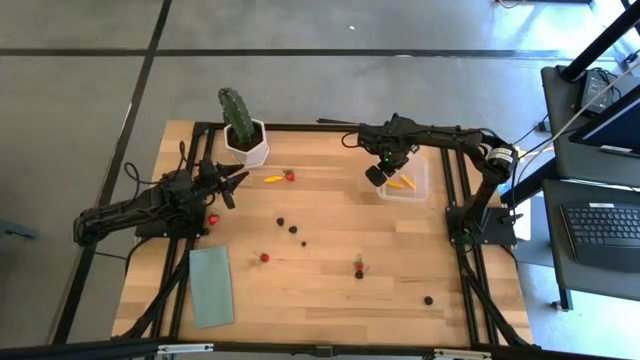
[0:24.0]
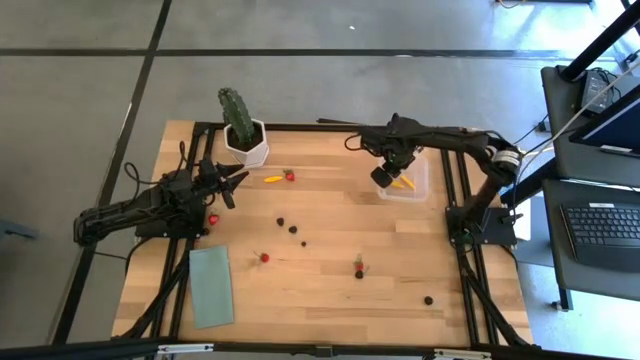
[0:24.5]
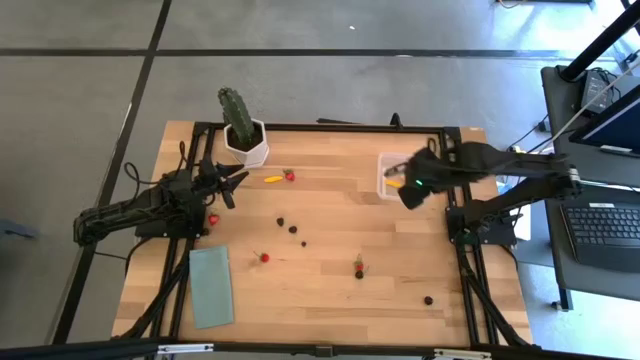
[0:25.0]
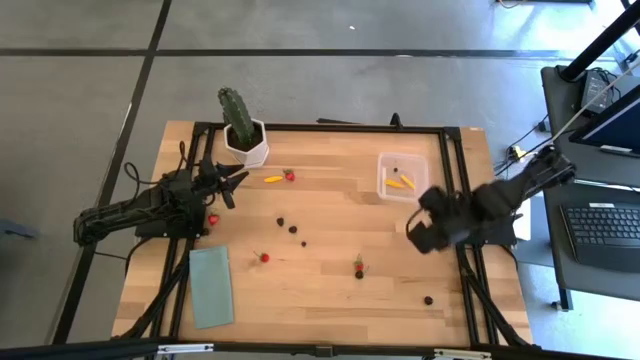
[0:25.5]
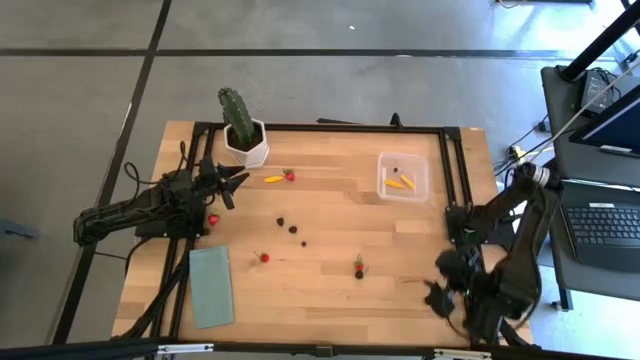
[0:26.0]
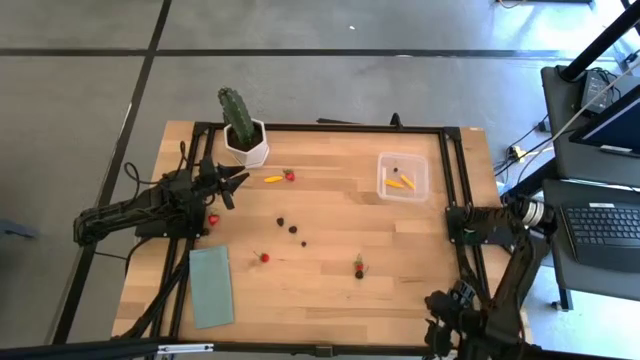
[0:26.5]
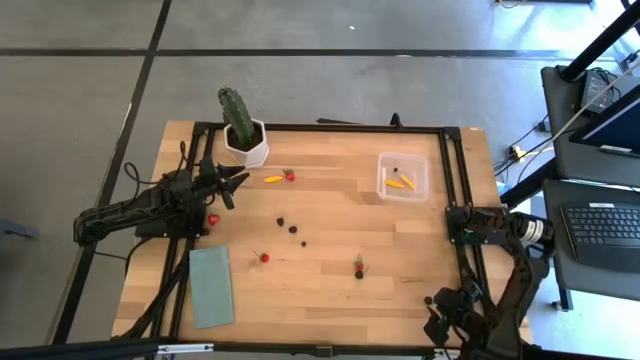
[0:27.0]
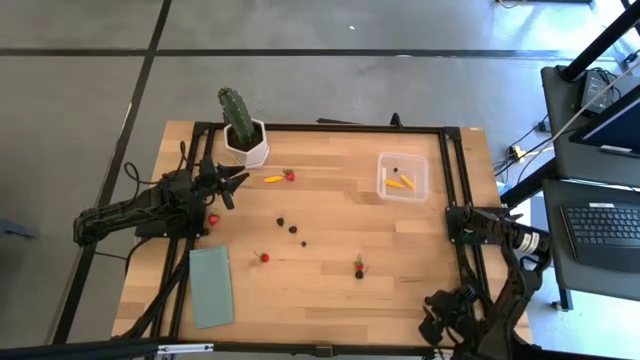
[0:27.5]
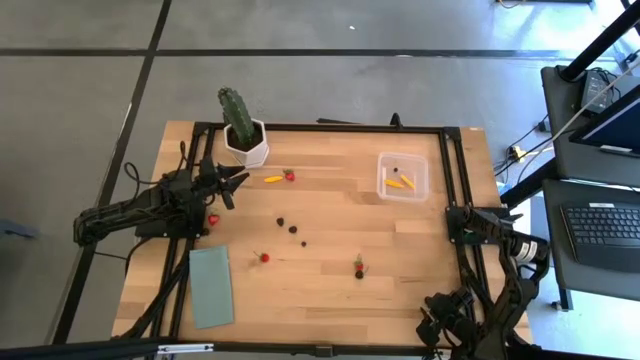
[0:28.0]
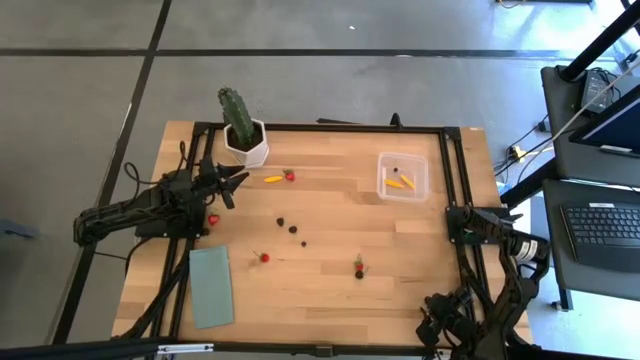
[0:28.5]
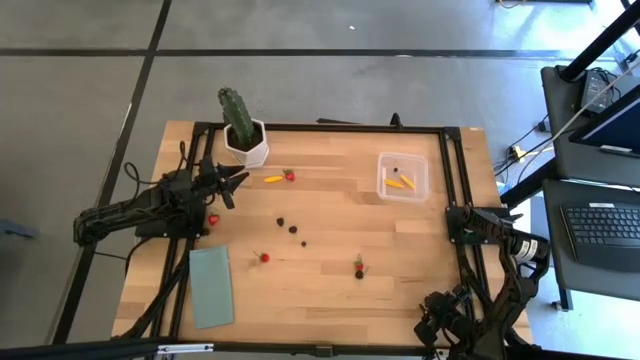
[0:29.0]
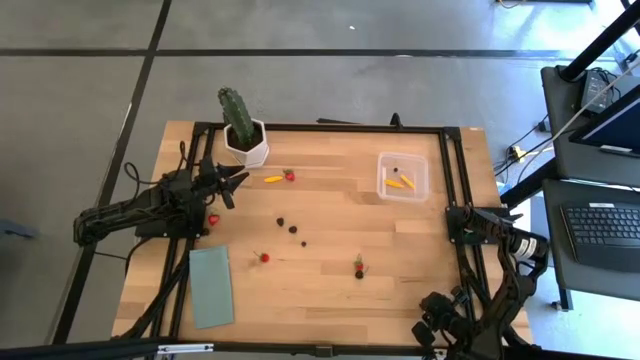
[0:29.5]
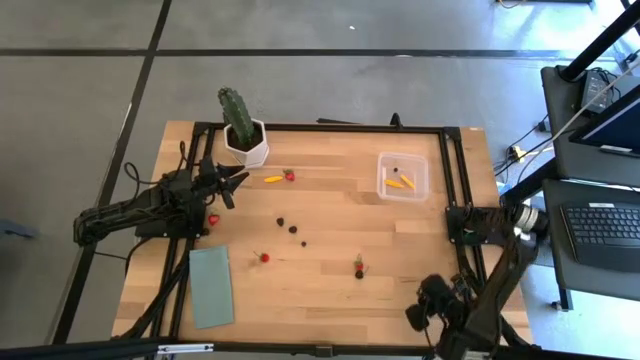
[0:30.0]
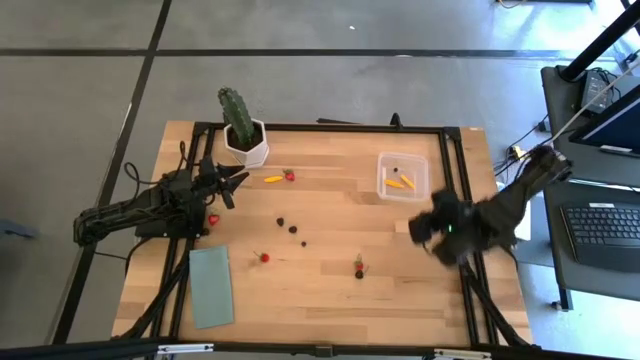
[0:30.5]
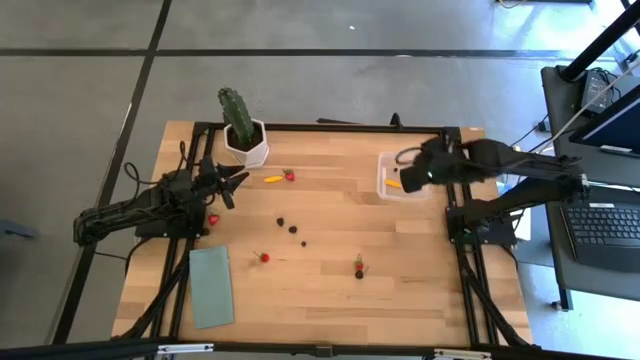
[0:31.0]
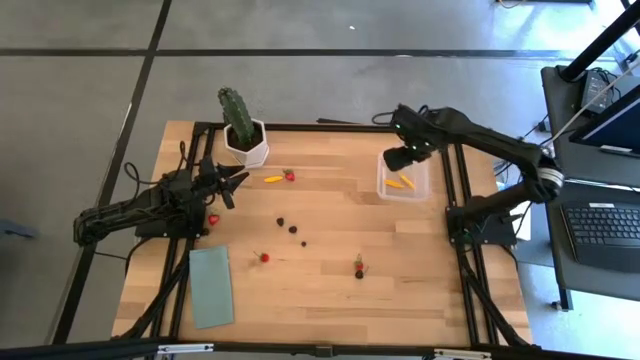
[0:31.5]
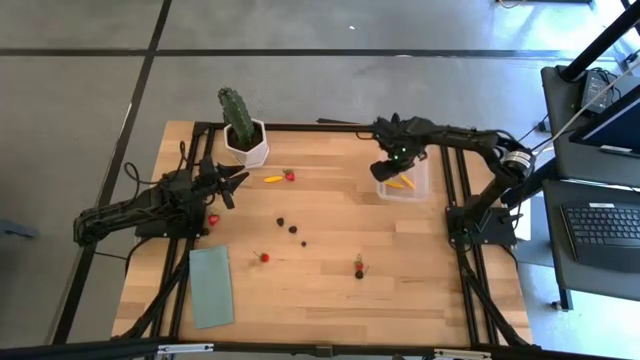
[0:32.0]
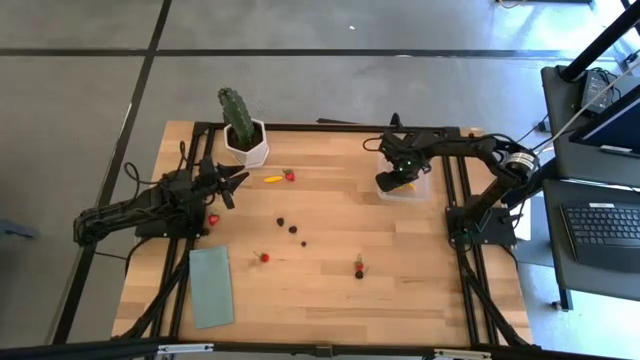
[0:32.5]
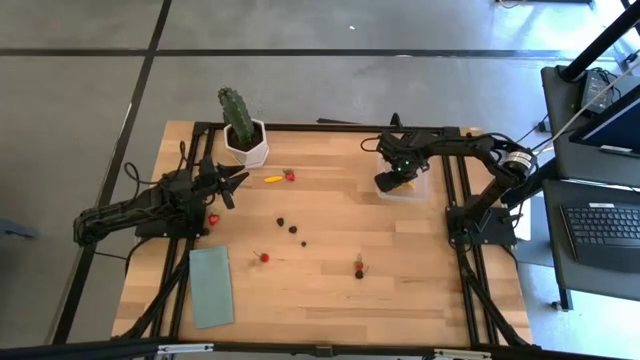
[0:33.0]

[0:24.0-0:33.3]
Task: Pick and placing Produce into tupperware
Put the bottom black cherry into the transparent bin

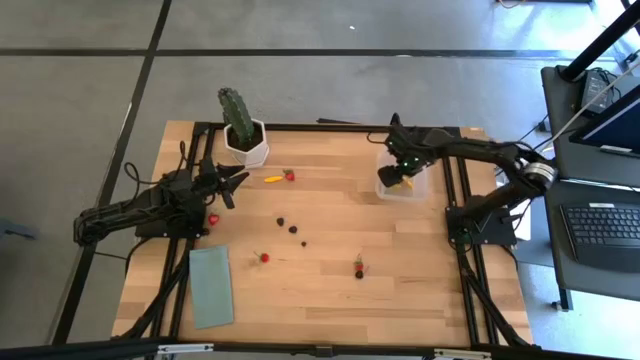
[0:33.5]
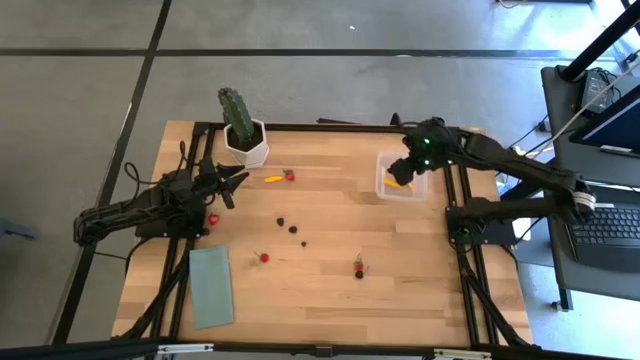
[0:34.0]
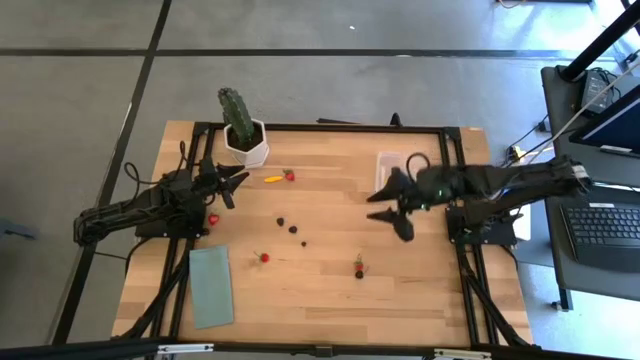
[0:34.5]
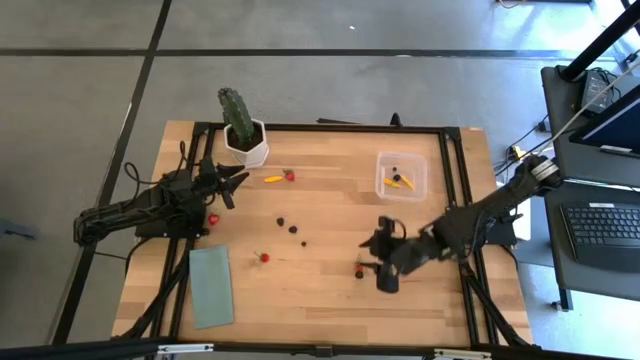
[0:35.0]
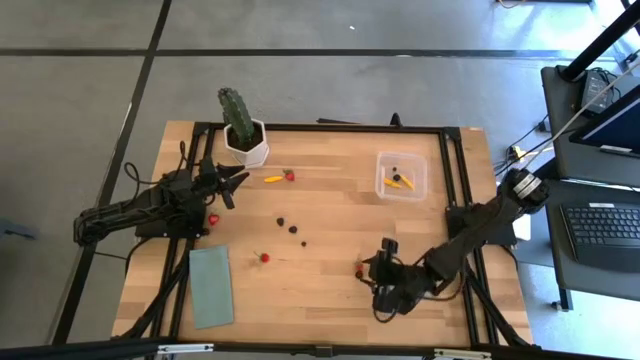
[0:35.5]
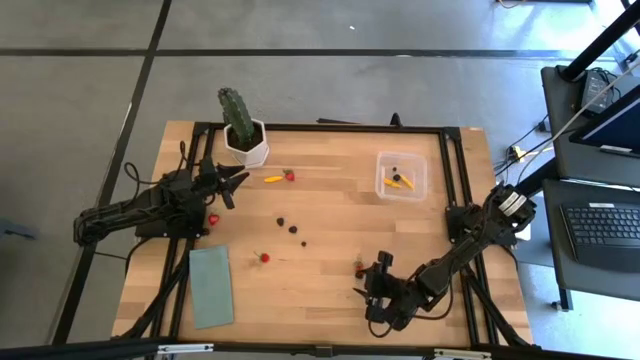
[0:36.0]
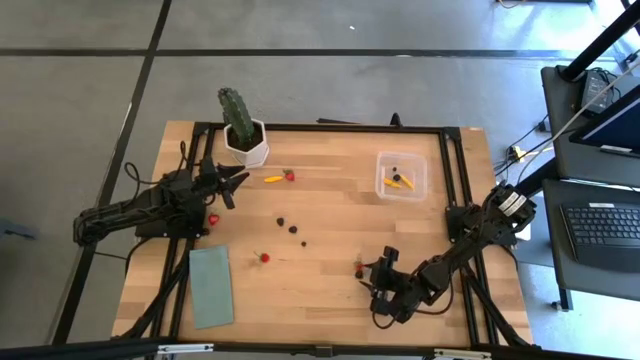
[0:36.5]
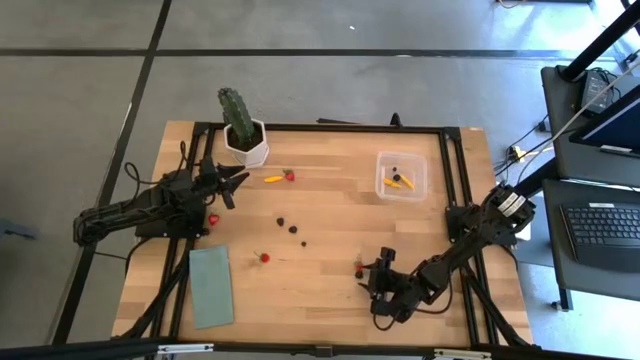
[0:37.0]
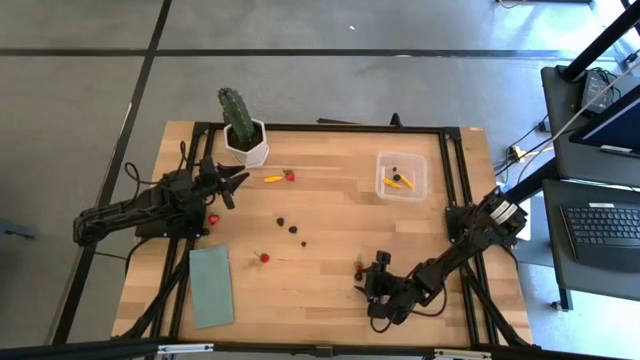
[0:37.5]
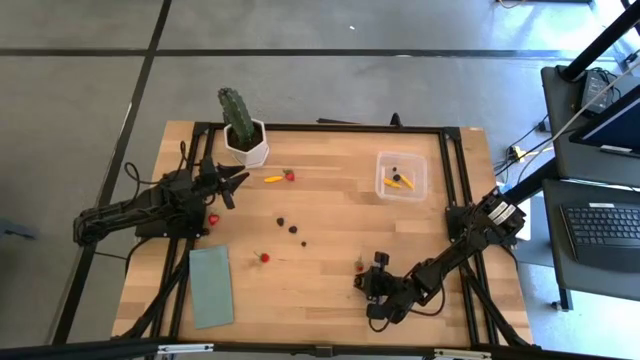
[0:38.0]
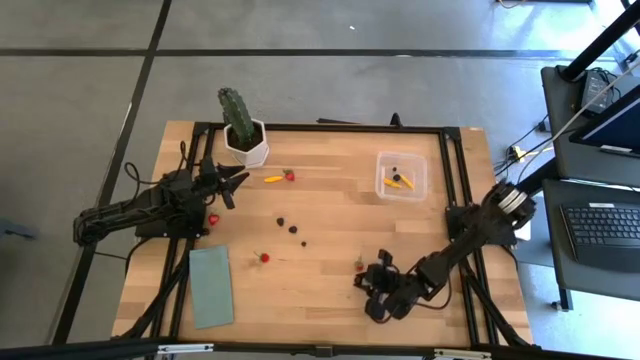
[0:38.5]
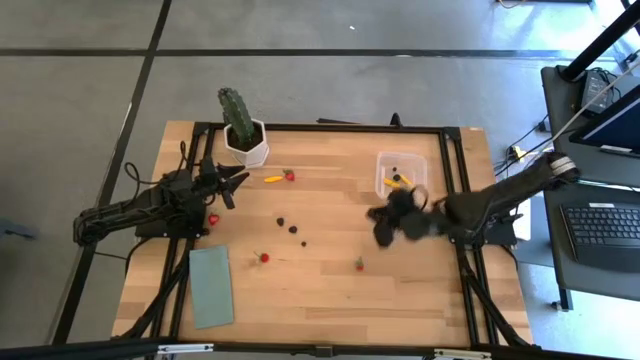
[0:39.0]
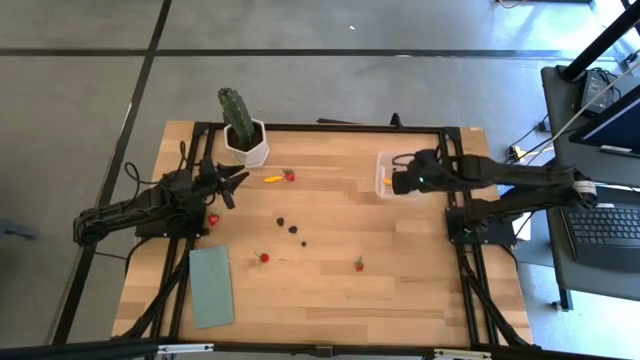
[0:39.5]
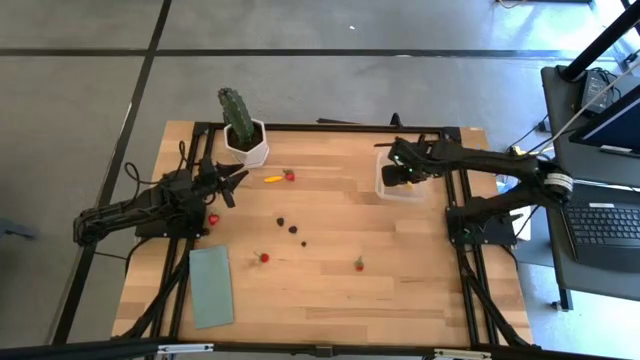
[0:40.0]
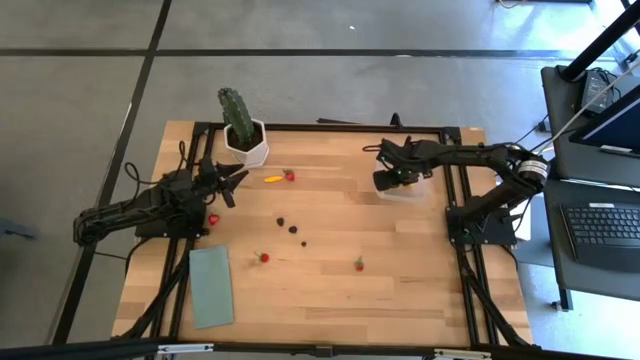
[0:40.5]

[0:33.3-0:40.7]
Put the bottom black cherry into the transparent bin

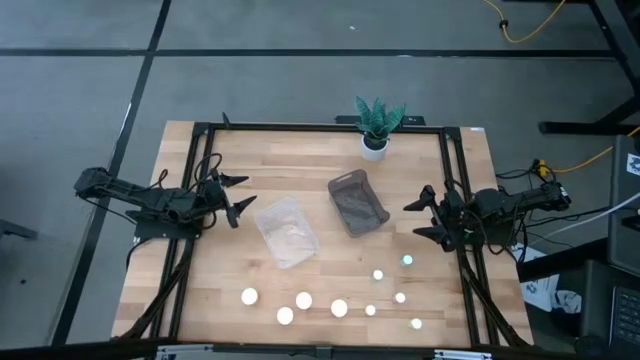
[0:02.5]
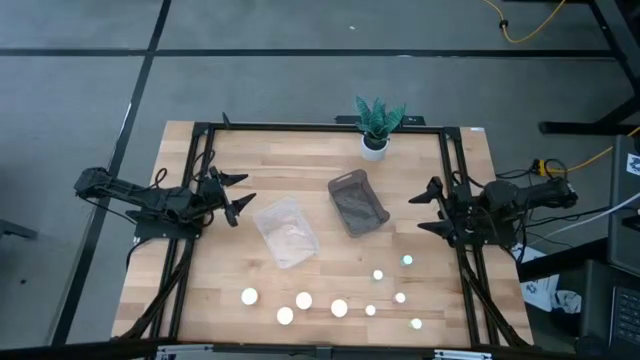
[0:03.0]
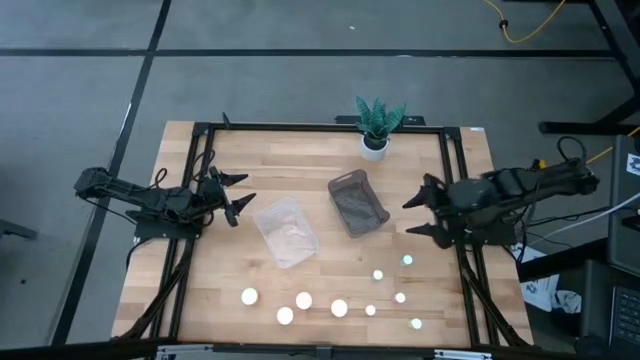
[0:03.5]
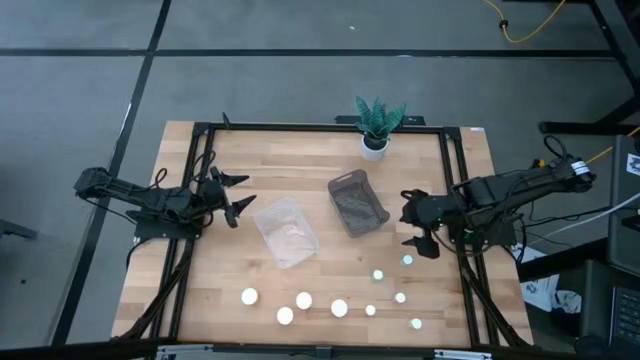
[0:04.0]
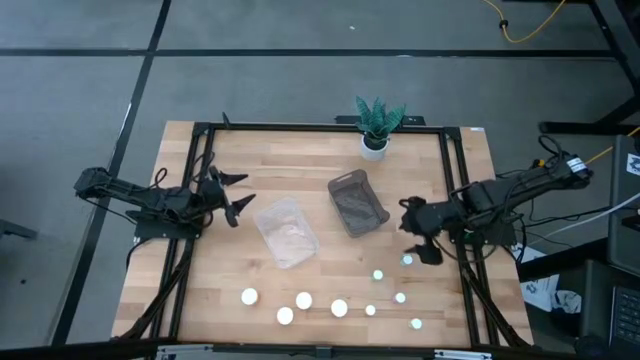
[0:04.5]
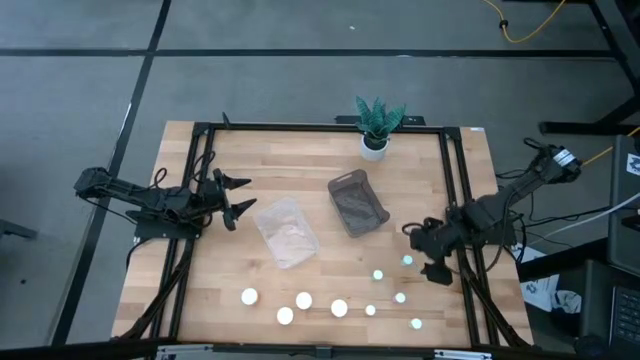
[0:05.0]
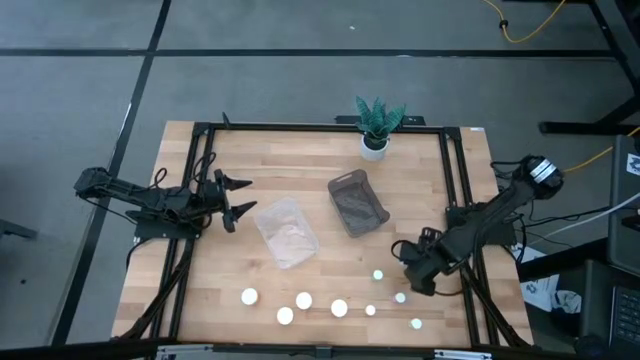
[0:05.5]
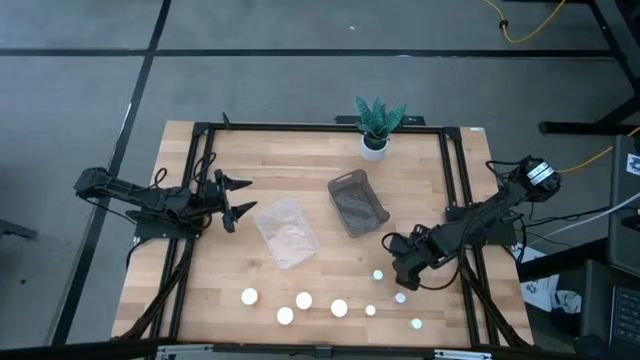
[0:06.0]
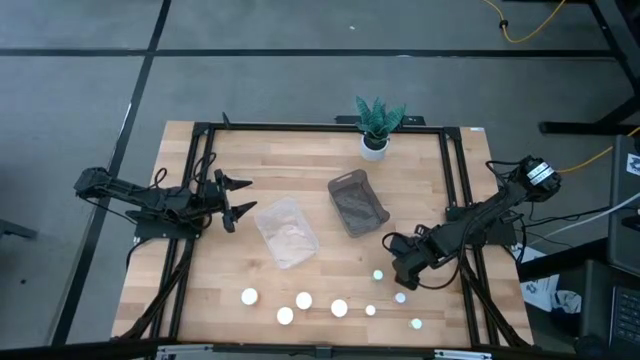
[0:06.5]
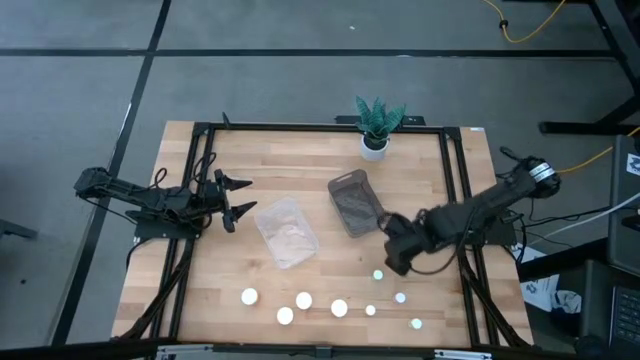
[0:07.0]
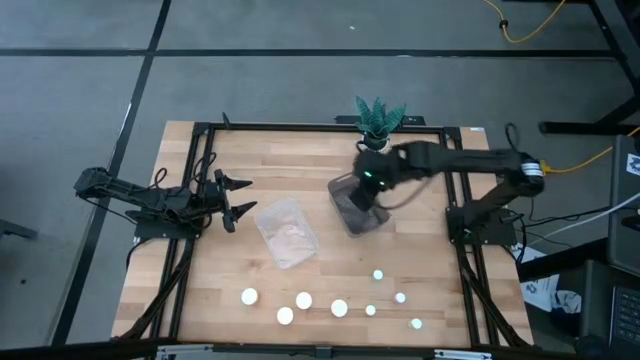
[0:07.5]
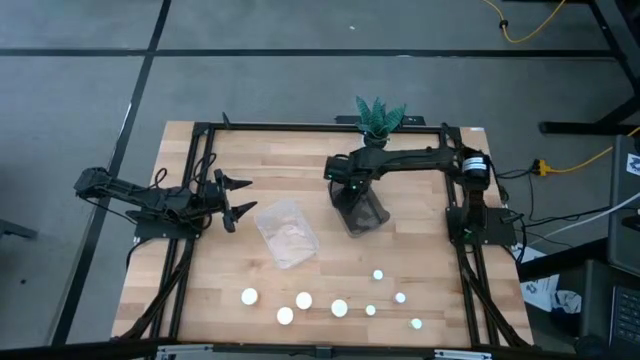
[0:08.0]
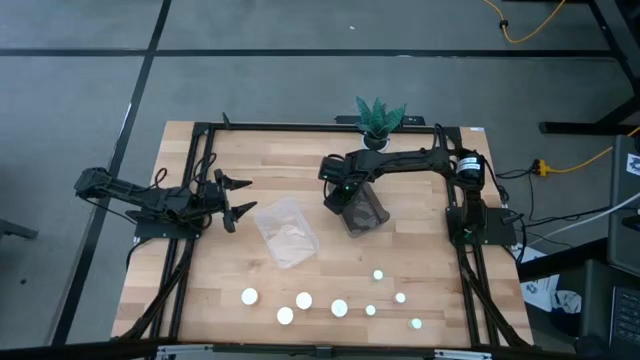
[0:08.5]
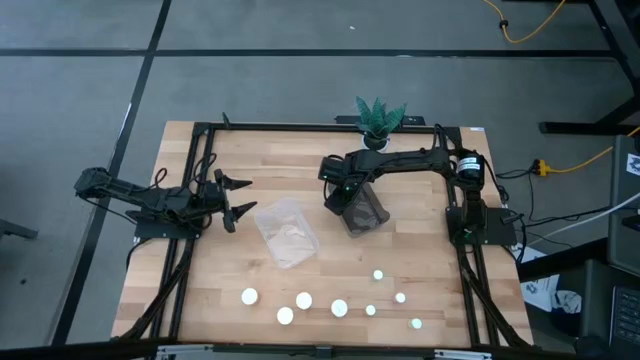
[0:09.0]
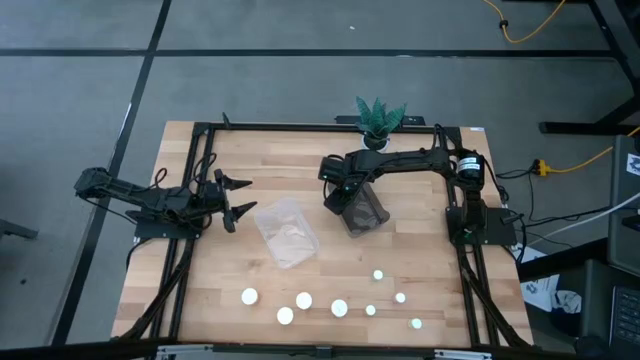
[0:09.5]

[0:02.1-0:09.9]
Task: Pick and place medicine bottles into bin by pill shape (circle, oval)
Put the small blue pill bottle into the black bin
